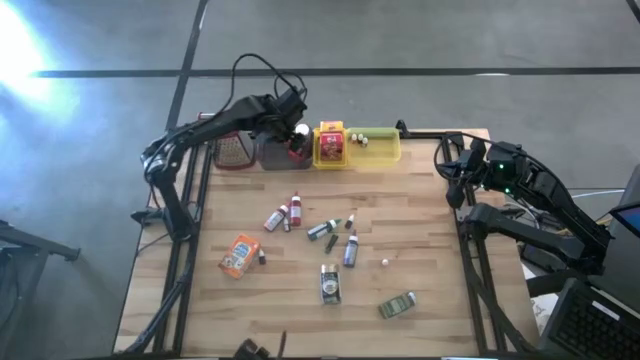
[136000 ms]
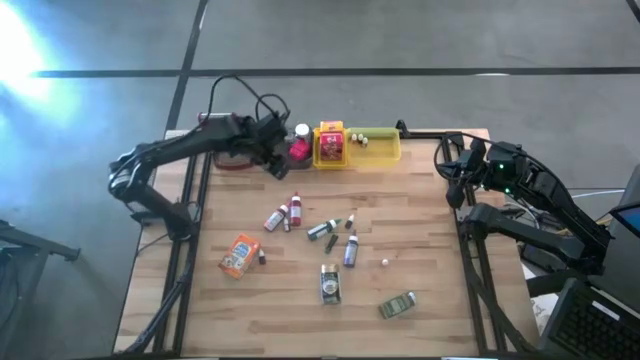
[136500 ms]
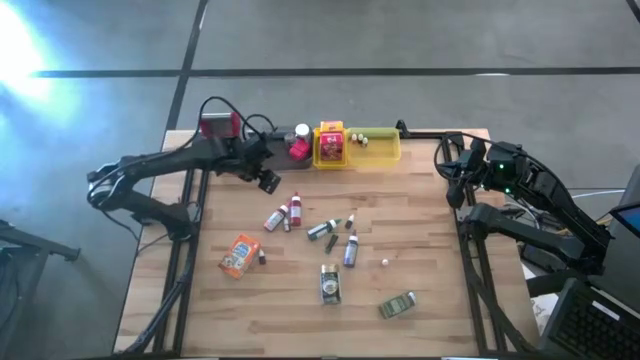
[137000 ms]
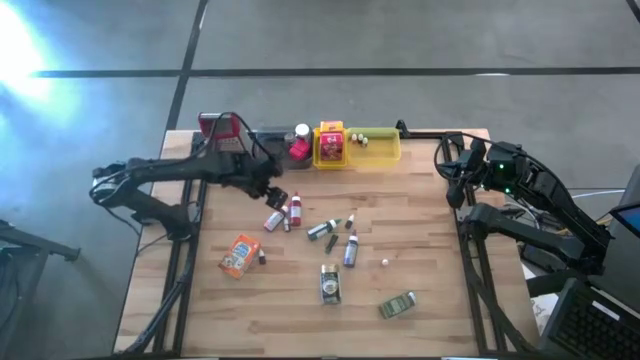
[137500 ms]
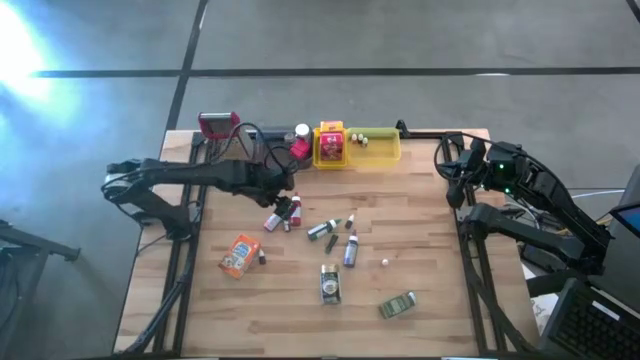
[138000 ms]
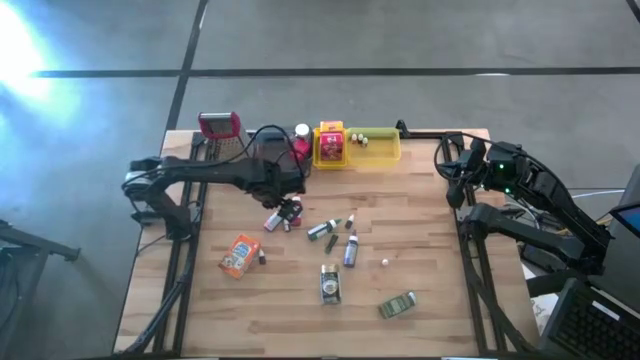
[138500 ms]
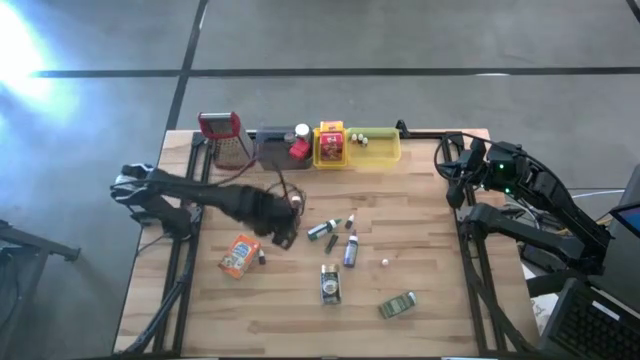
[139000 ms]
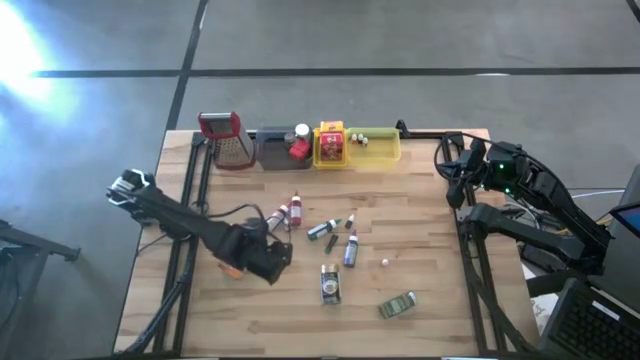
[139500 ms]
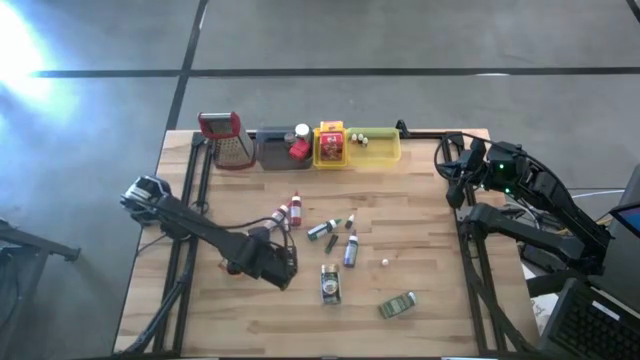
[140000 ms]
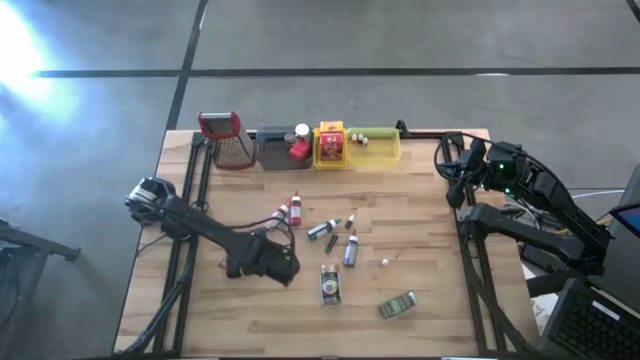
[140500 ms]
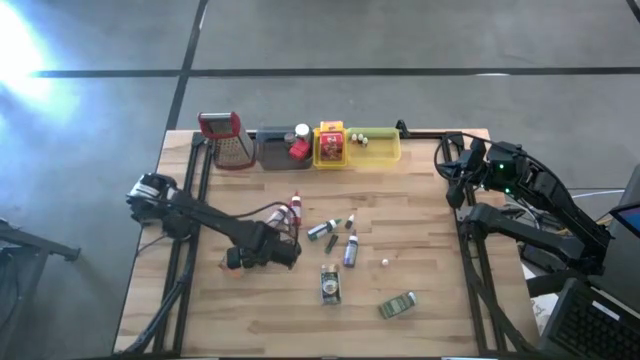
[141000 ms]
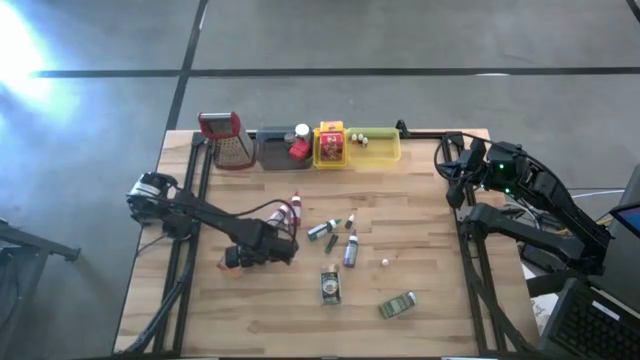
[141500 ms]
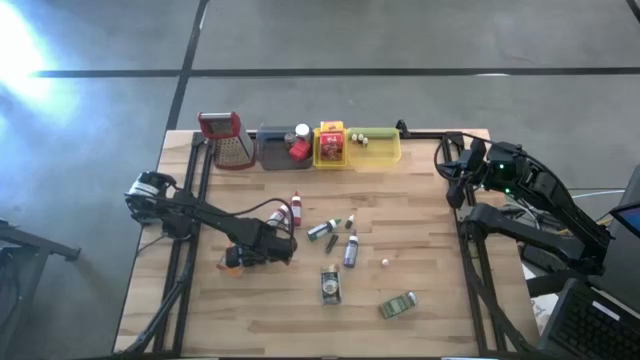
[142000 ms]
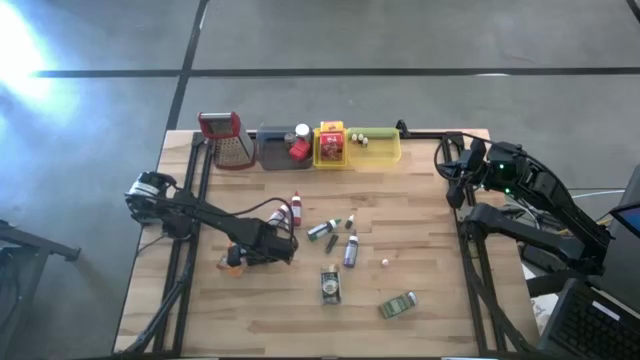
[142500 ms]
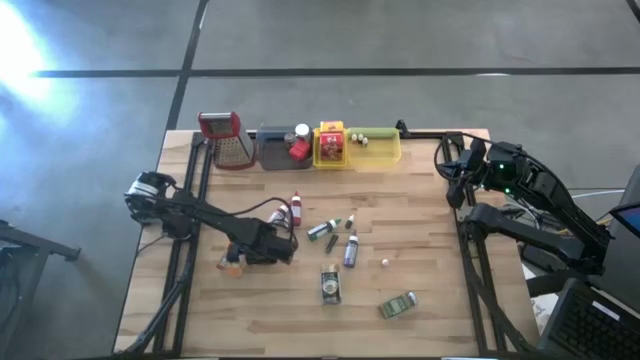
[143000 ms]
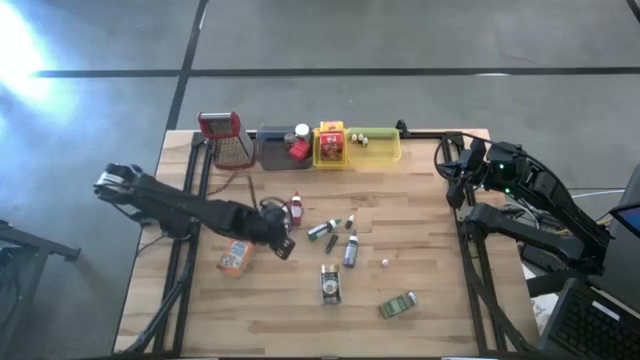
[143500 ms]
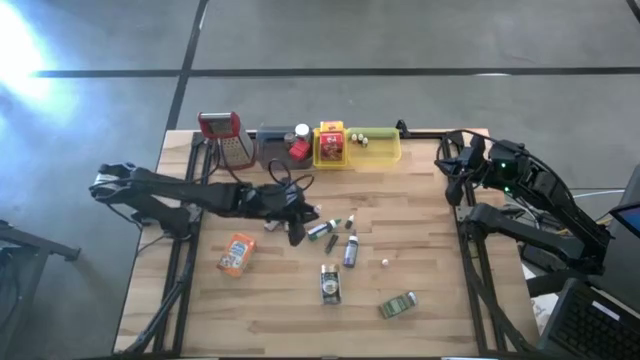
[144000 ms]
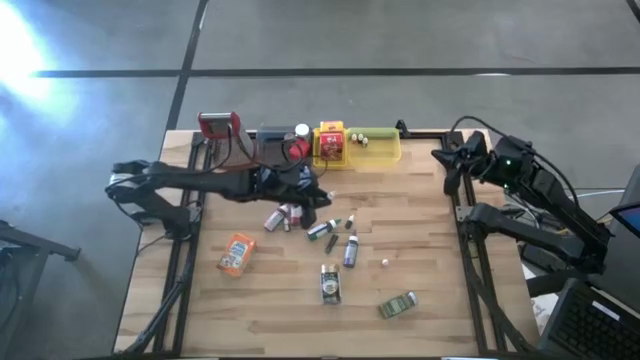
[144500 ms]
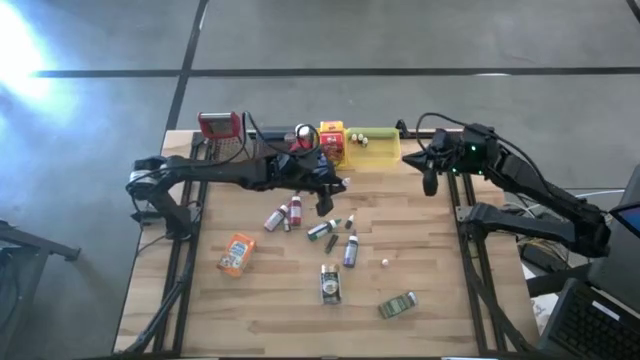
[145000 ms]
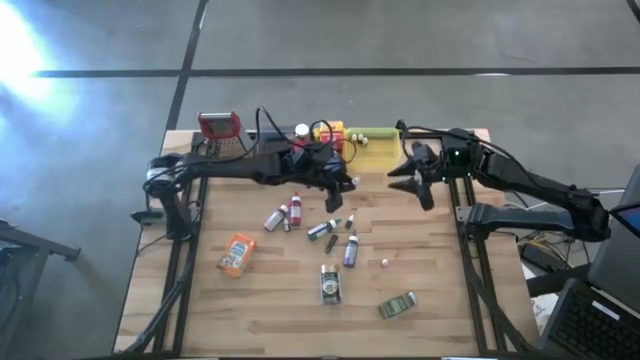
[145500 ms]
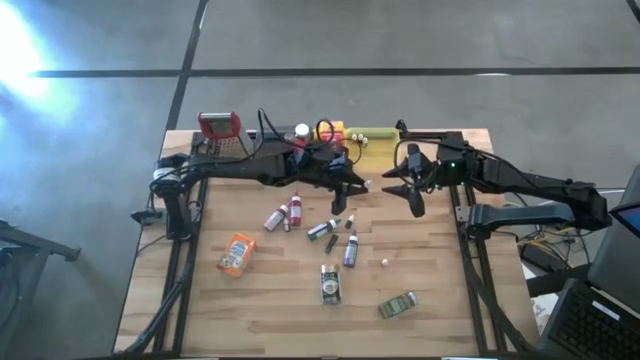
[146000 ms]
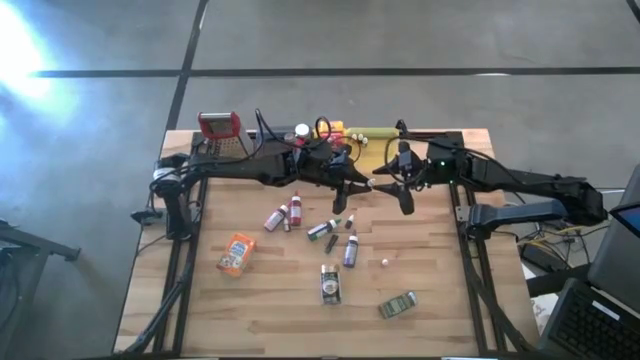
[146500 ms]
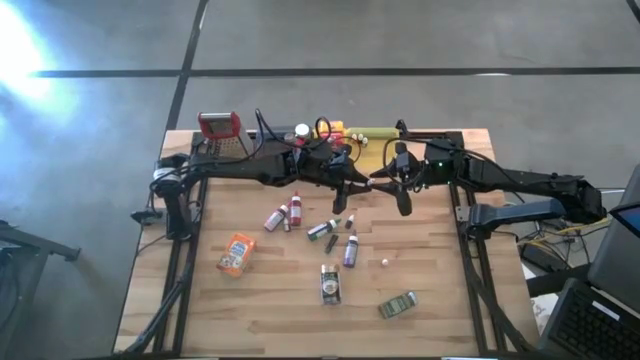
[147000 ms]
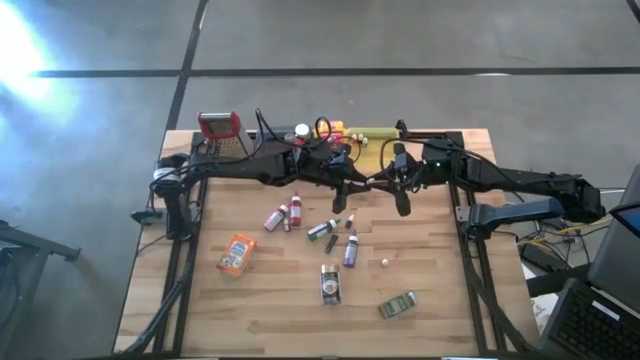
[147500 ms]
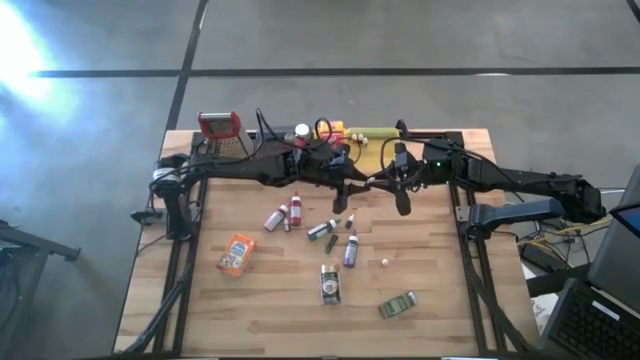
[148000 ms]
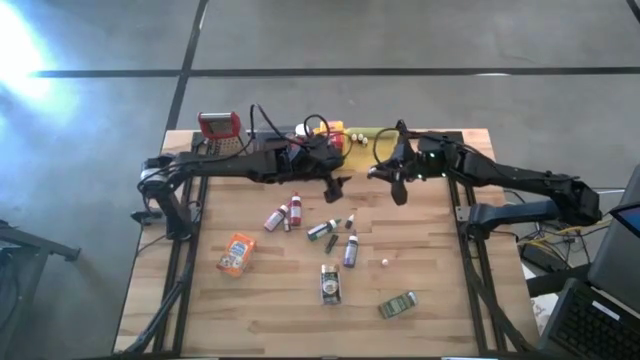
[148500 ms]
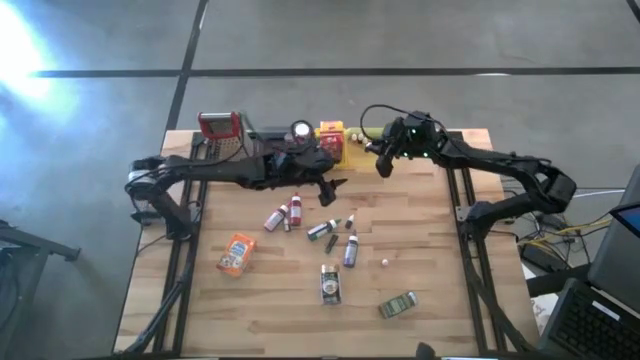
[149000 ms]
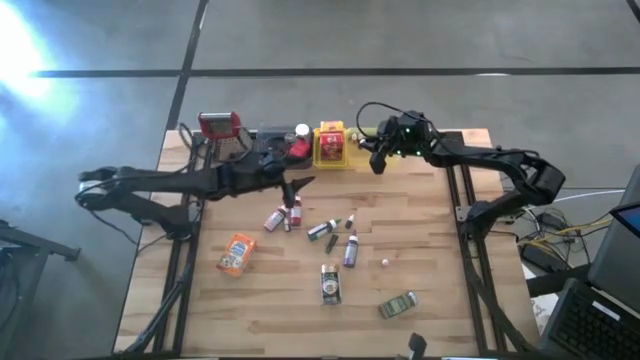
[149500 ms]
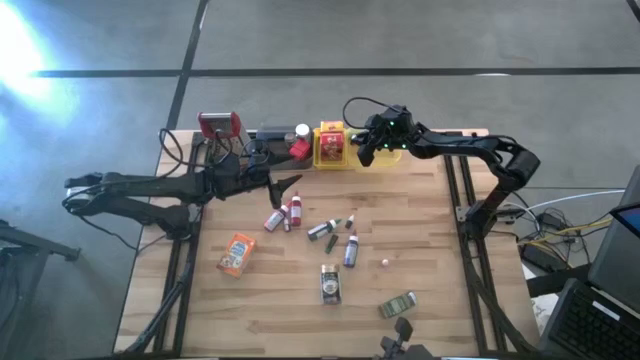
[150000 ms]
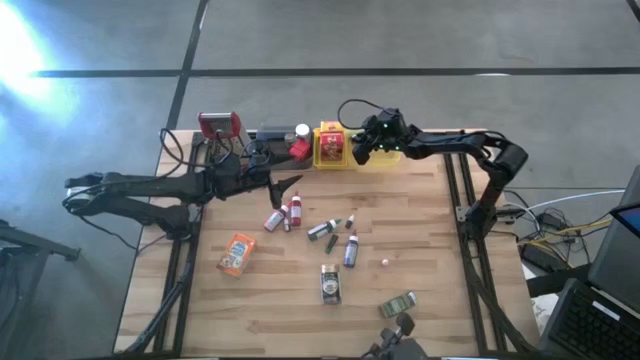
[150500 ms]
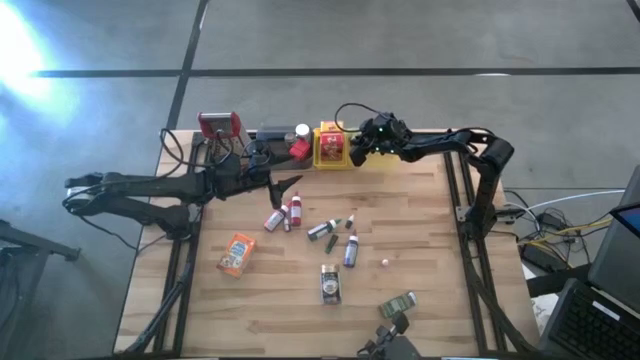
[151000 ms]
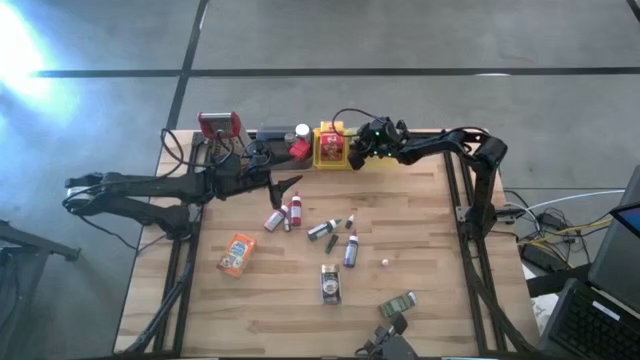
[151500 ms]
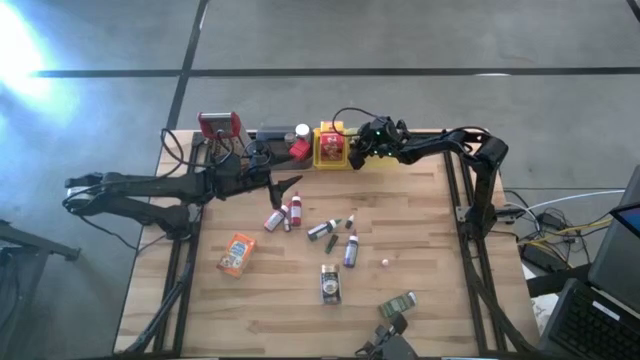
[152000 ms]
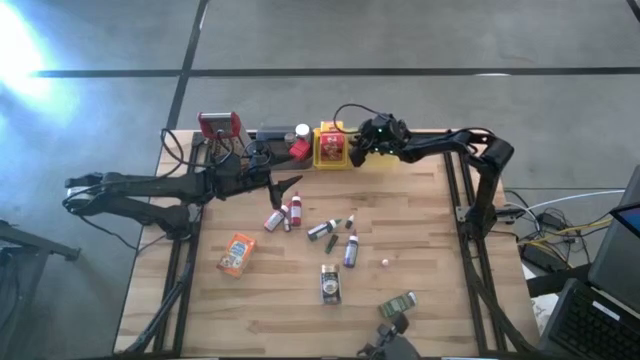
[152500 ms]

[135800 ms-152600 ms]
Task: Pick & Place Kitchen Items
Put the black food coloring bottle into the light yellow bin
